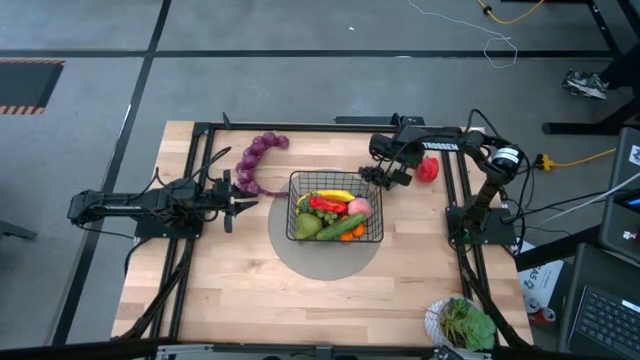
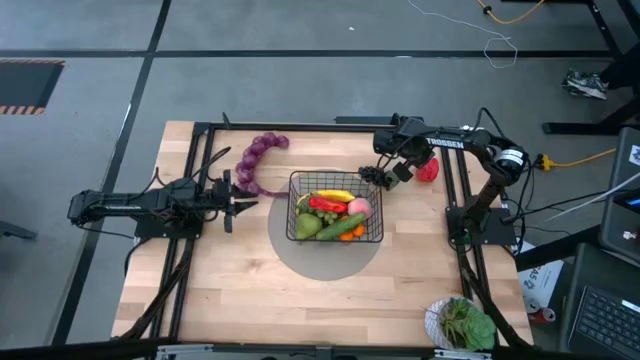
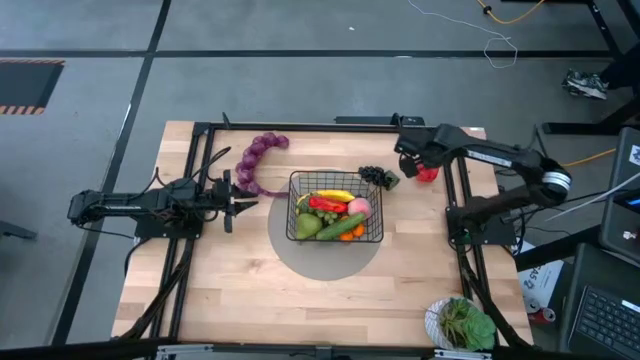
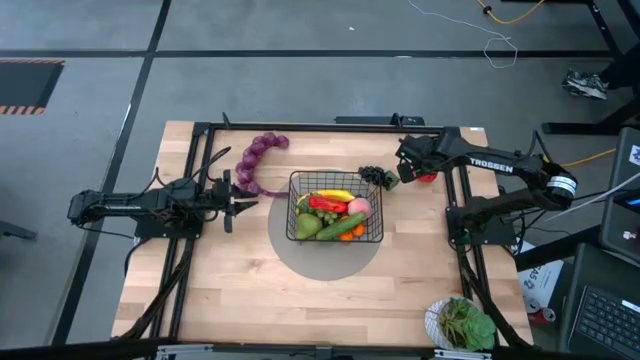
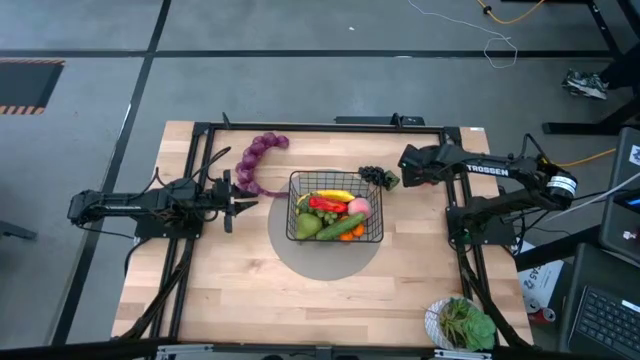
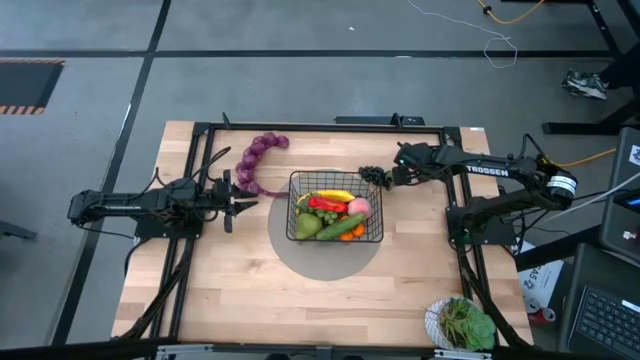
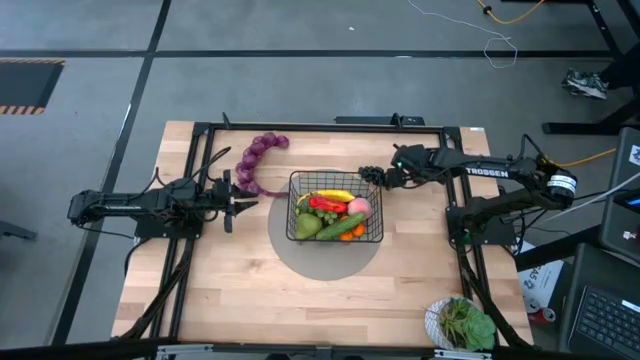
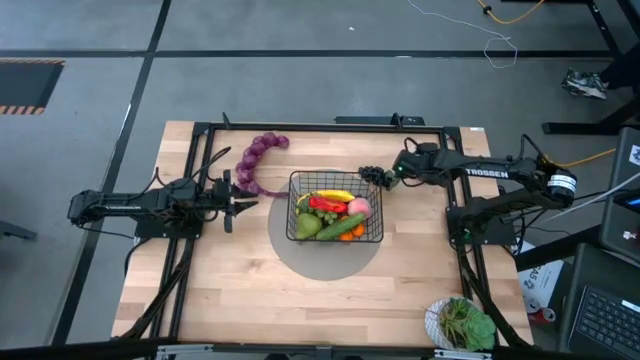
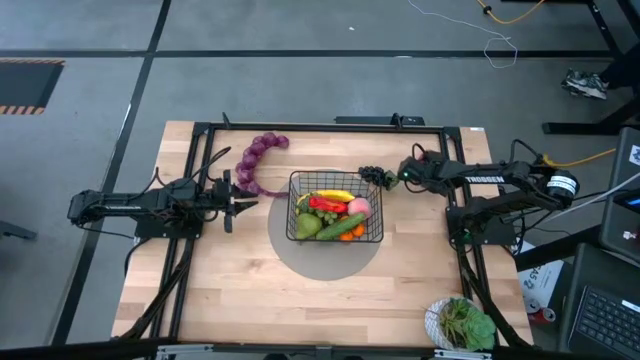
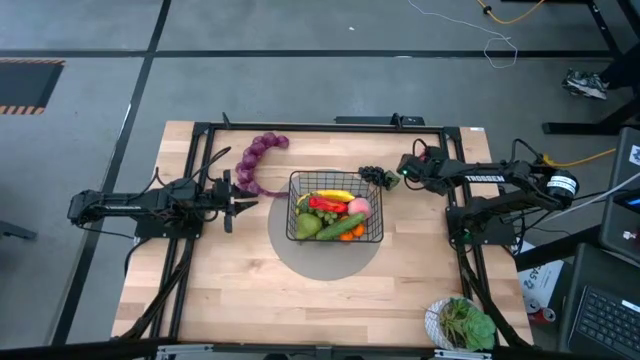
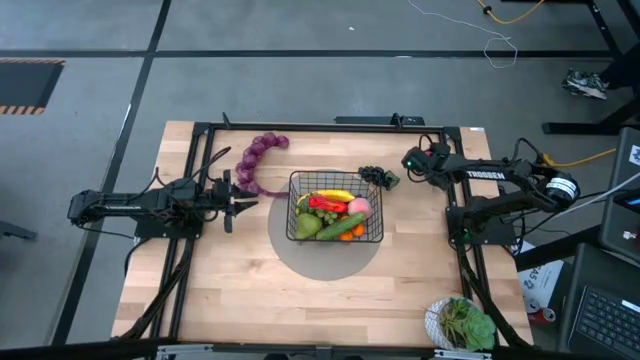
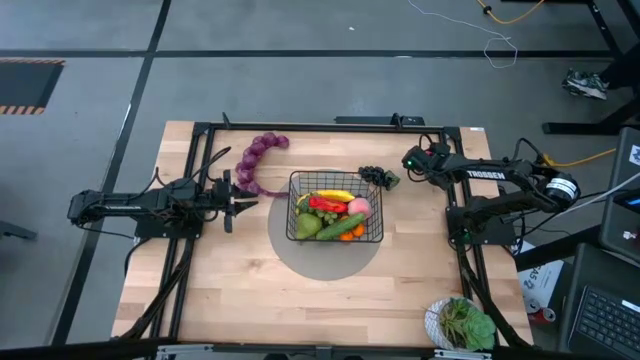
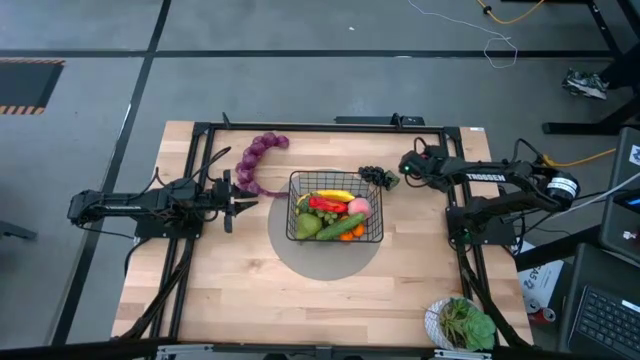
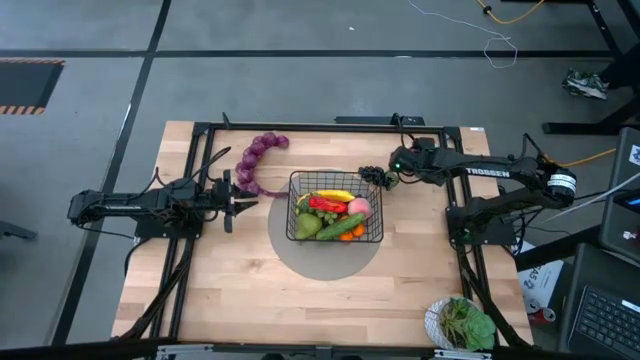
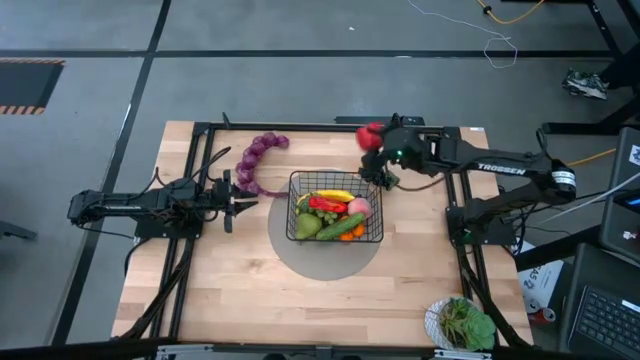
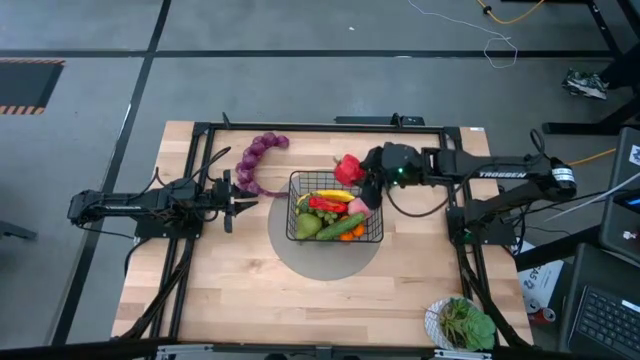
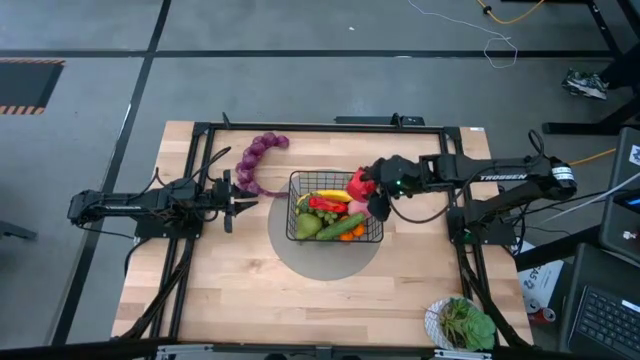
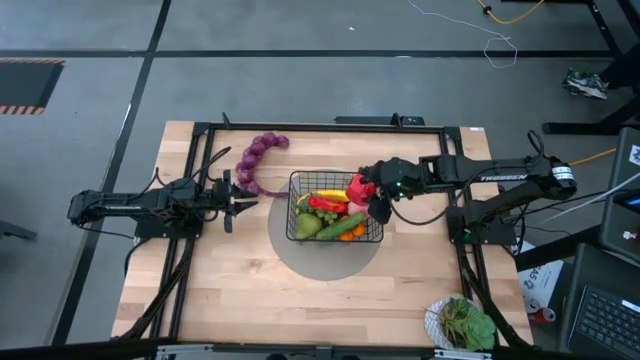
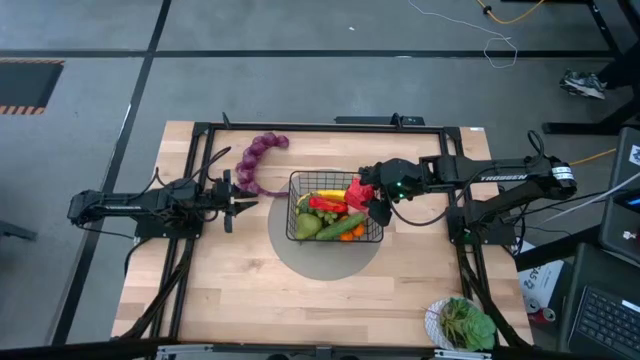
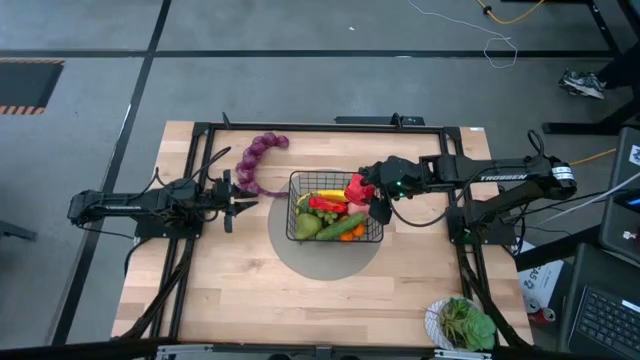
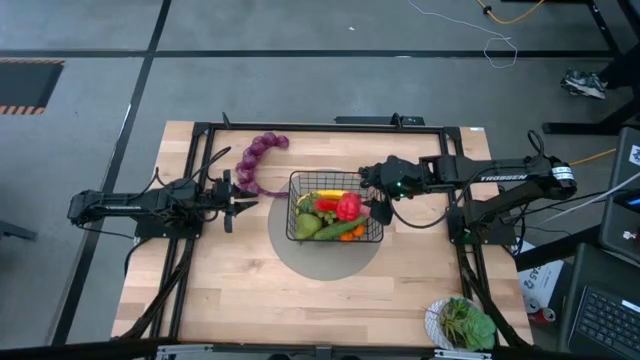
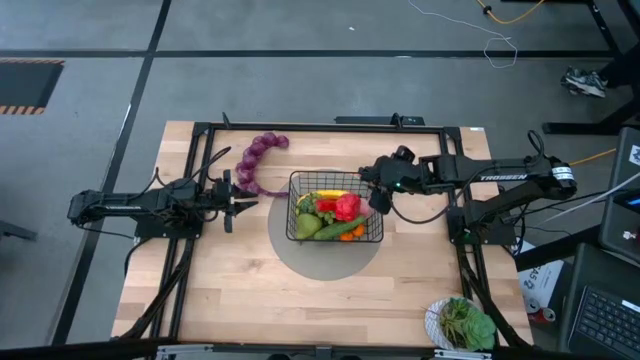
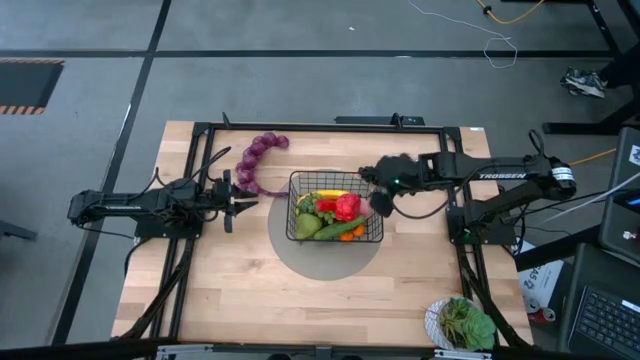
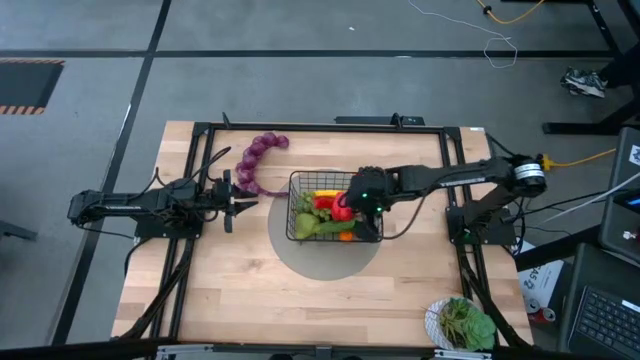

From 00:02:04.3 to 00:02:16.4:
Task: Build produce basket
Put the red bell pepper into the wire basket

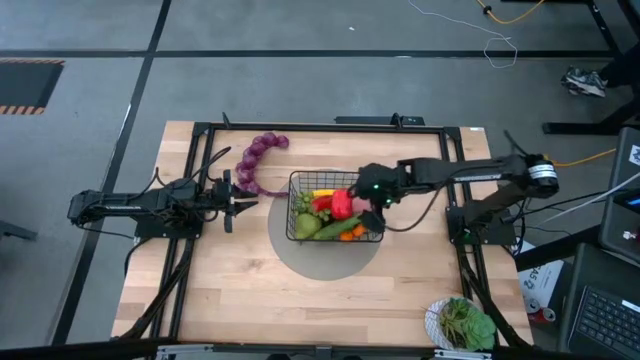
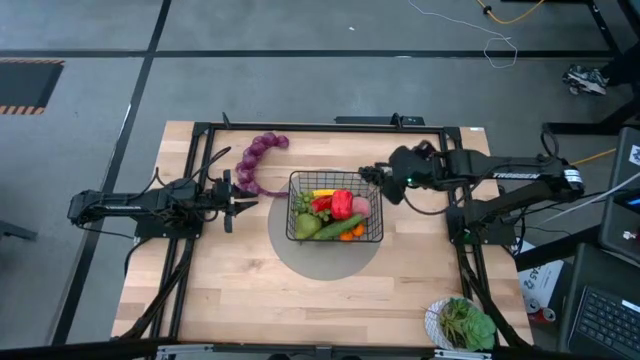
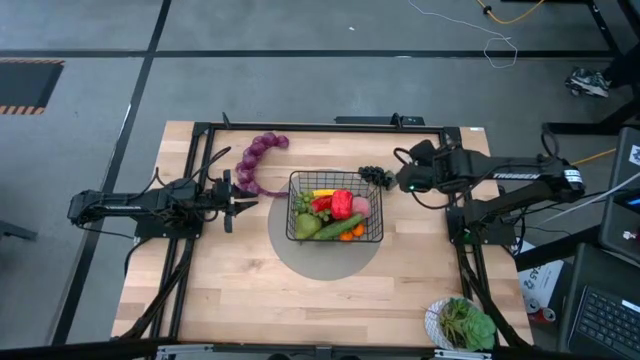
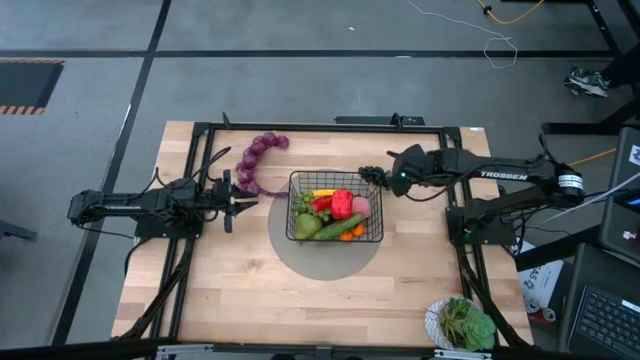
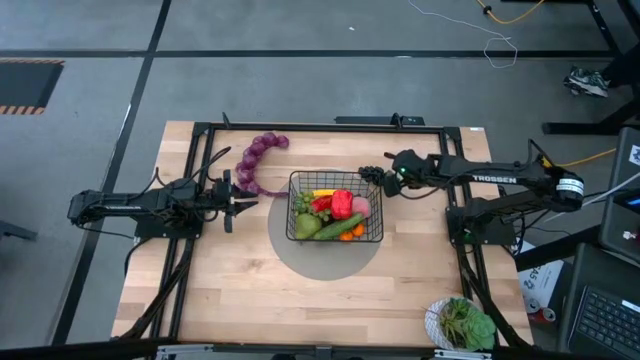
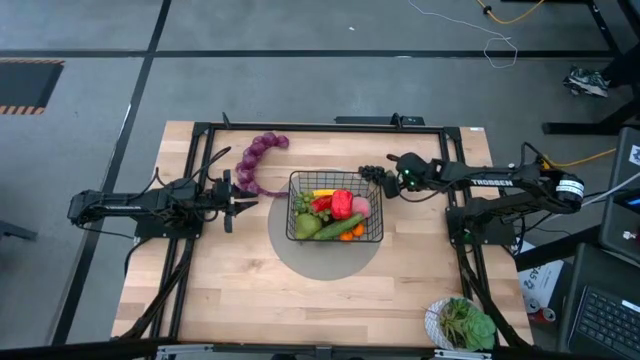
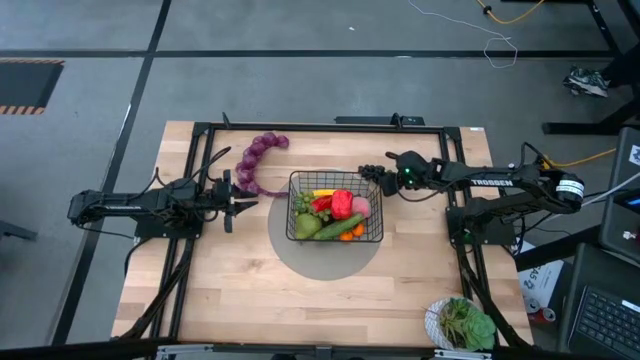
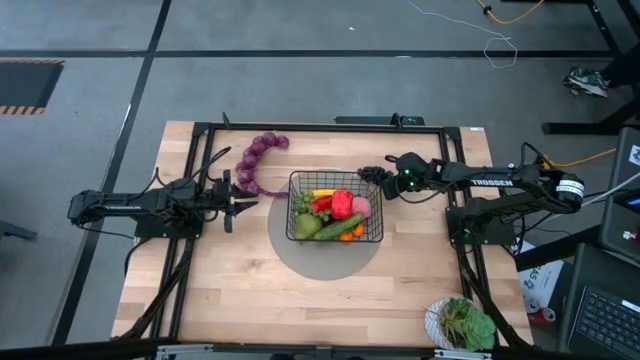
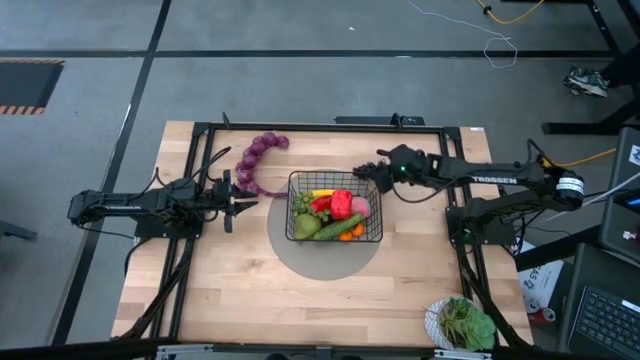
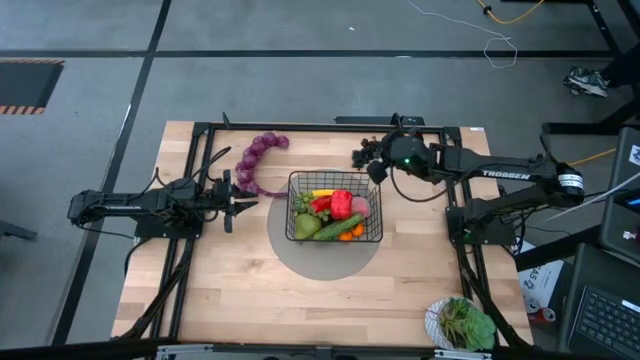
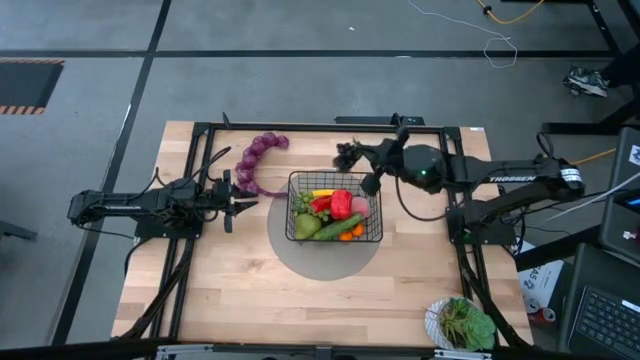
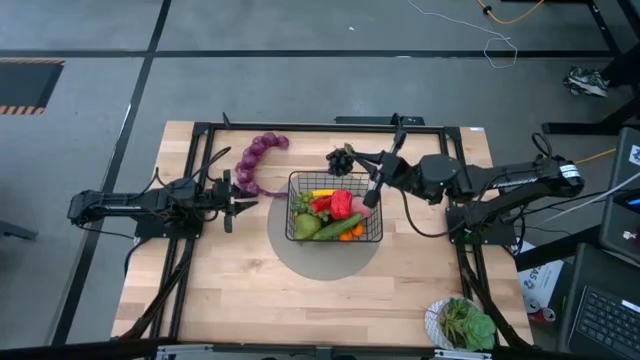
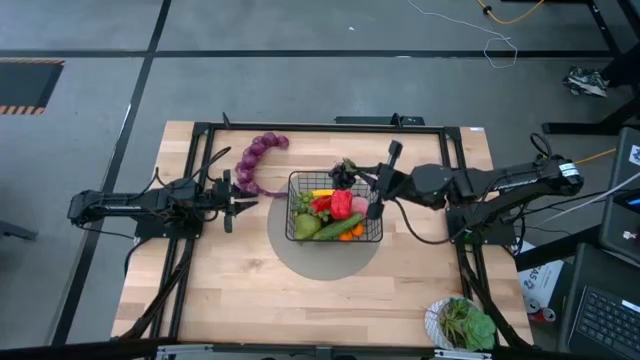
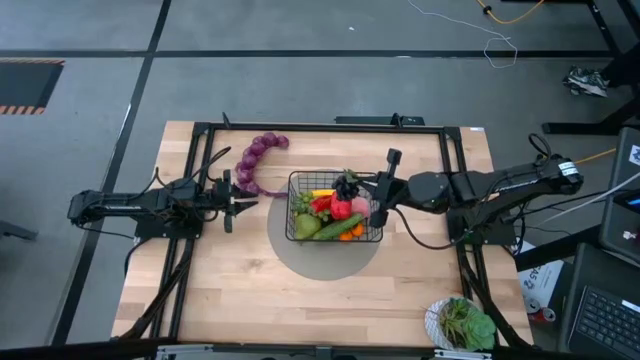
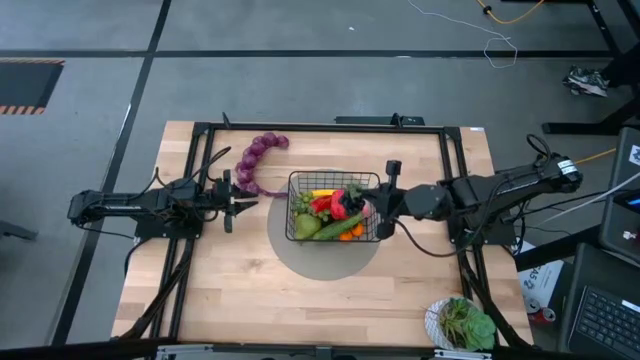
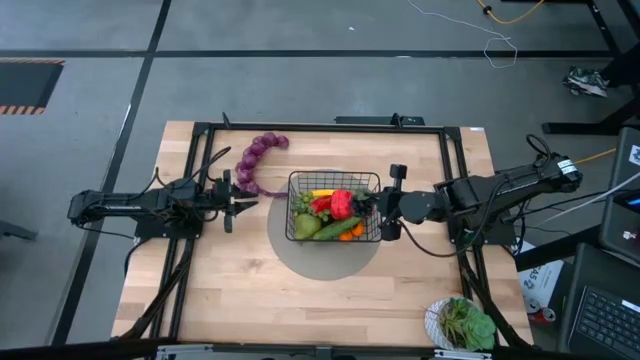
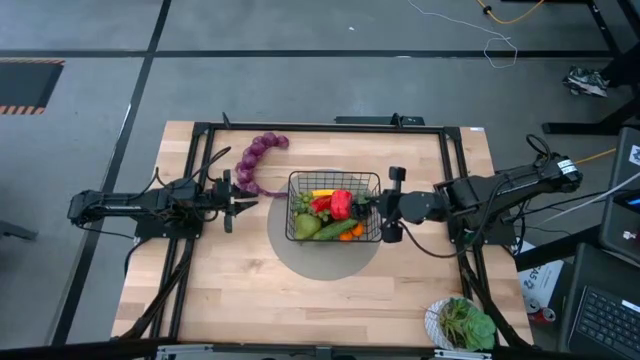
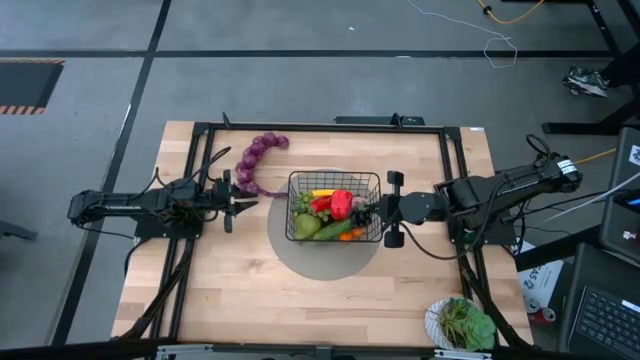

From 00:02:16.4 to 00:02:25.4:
Put the grapes into the wire basket
